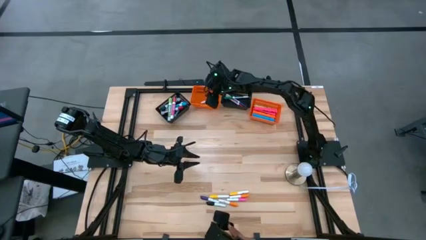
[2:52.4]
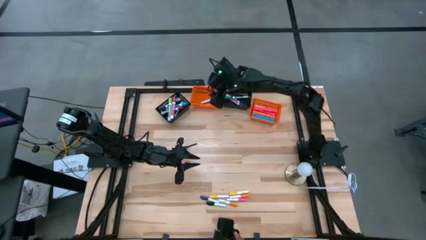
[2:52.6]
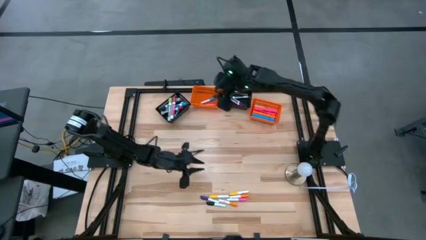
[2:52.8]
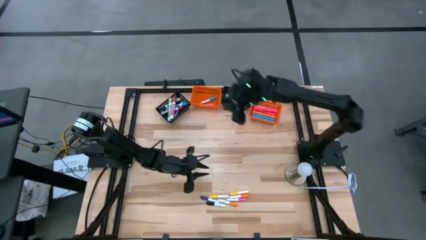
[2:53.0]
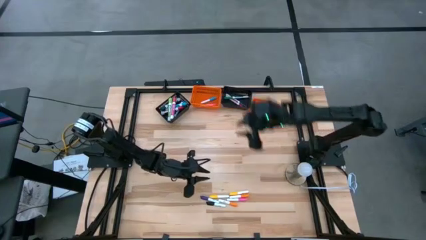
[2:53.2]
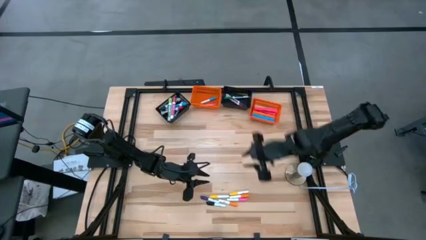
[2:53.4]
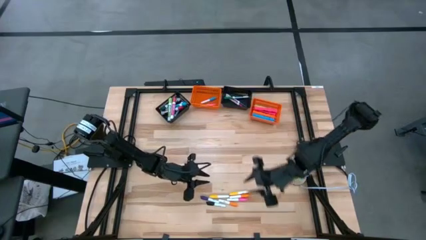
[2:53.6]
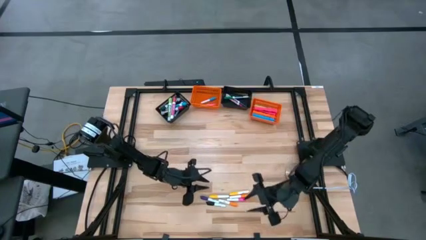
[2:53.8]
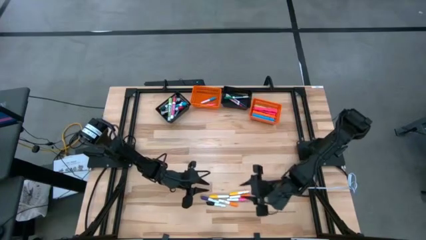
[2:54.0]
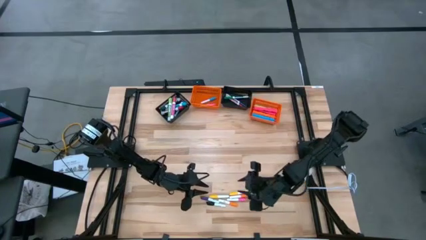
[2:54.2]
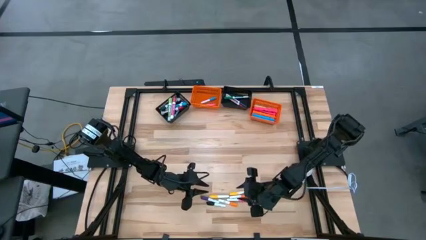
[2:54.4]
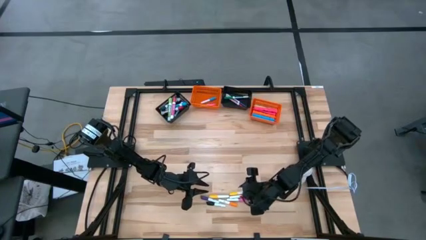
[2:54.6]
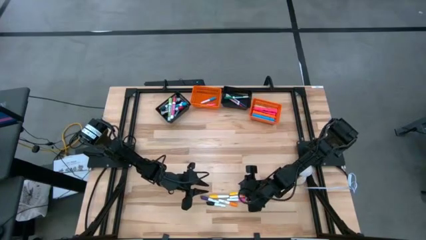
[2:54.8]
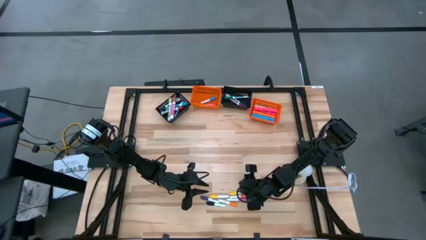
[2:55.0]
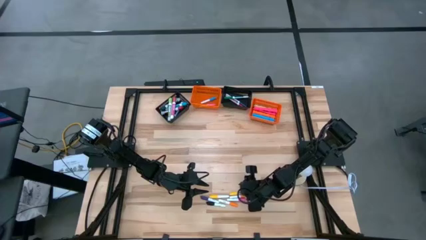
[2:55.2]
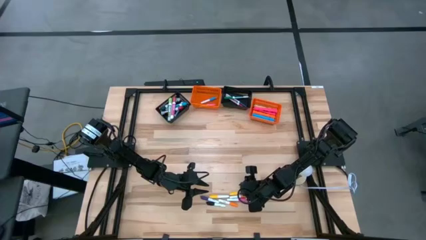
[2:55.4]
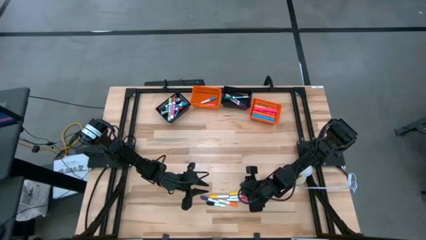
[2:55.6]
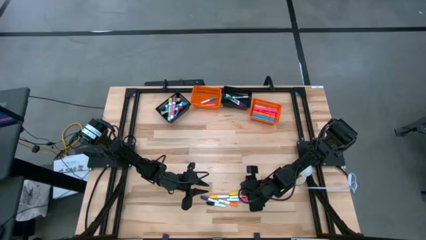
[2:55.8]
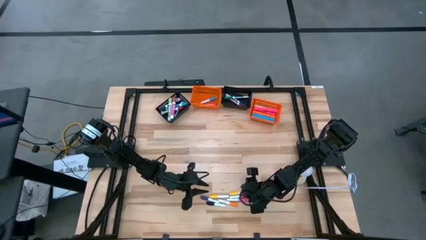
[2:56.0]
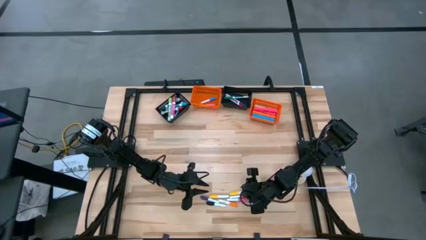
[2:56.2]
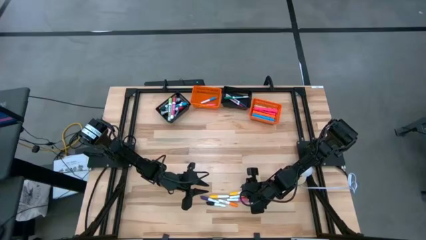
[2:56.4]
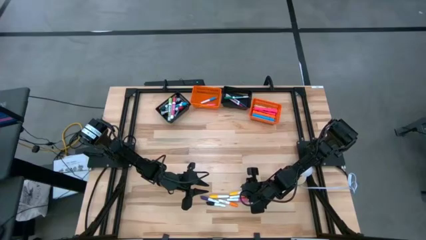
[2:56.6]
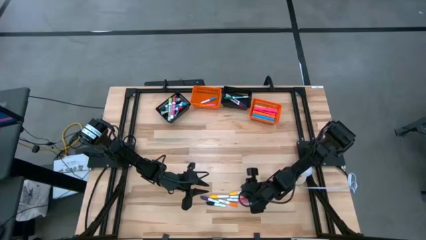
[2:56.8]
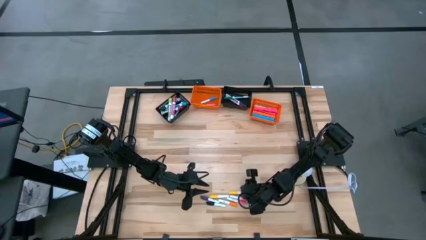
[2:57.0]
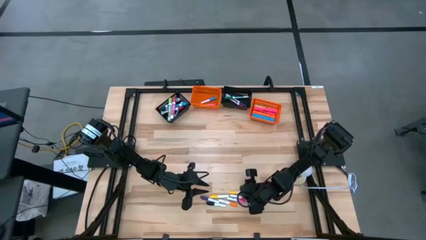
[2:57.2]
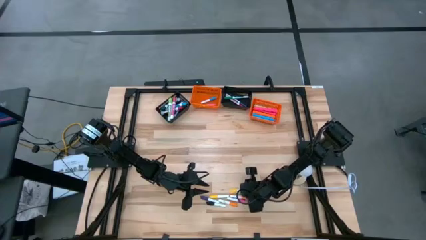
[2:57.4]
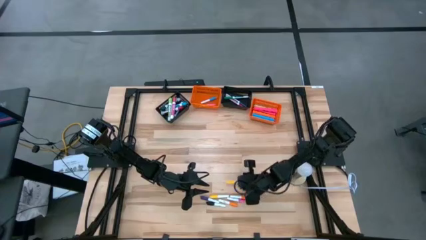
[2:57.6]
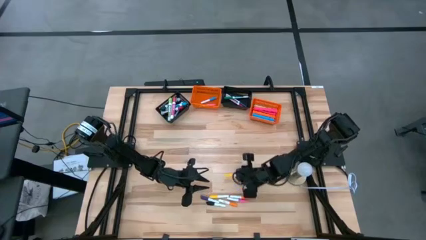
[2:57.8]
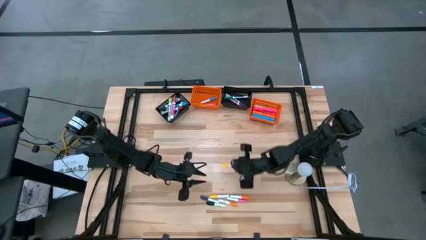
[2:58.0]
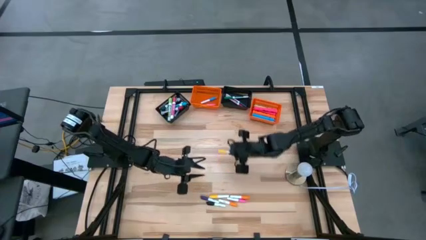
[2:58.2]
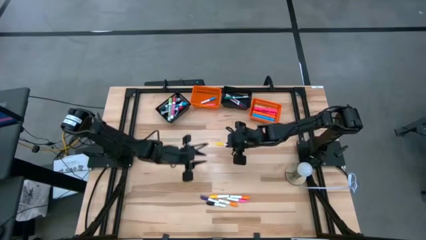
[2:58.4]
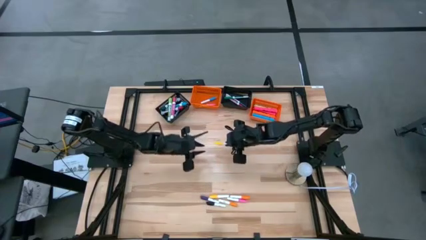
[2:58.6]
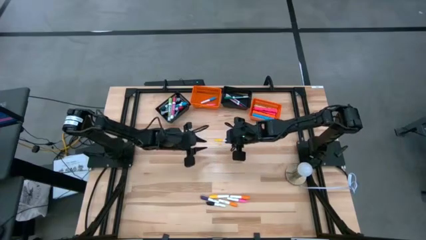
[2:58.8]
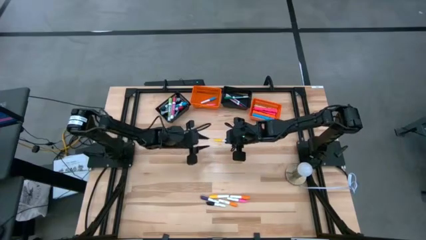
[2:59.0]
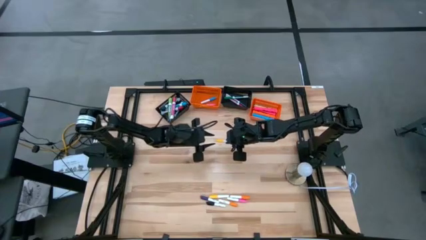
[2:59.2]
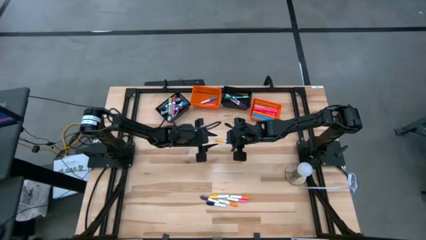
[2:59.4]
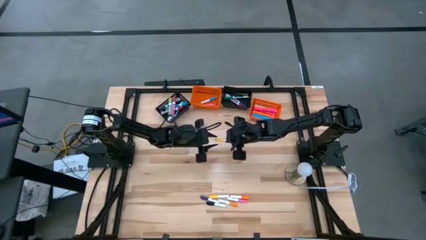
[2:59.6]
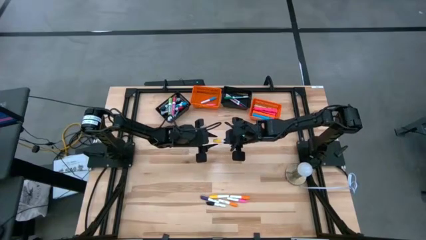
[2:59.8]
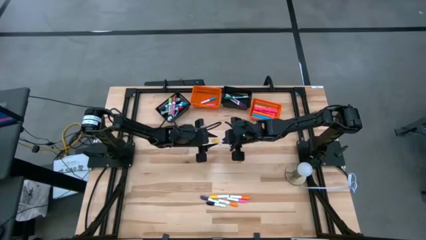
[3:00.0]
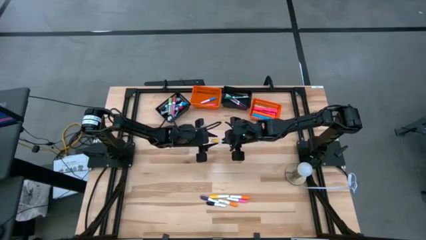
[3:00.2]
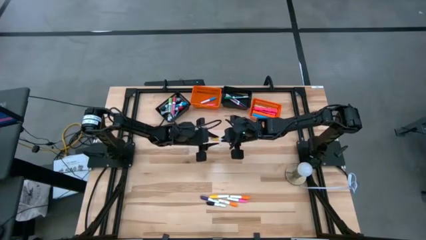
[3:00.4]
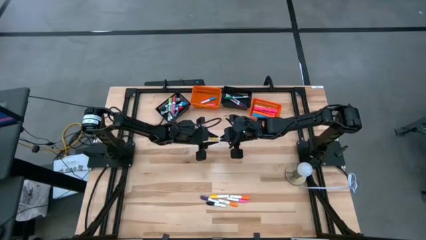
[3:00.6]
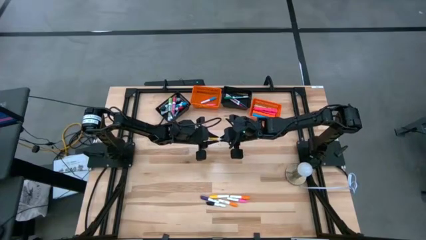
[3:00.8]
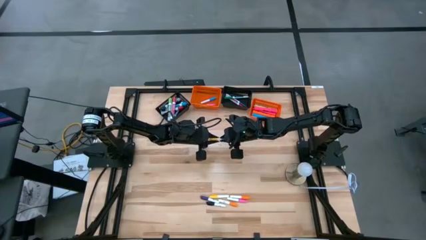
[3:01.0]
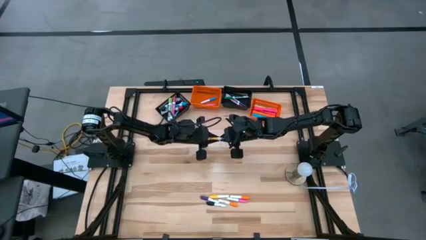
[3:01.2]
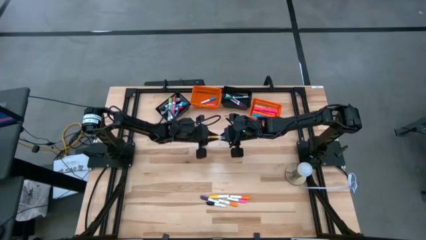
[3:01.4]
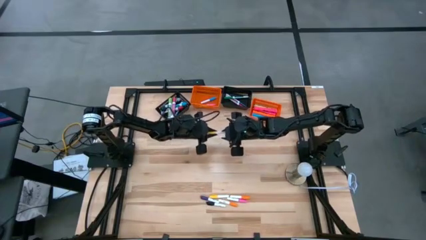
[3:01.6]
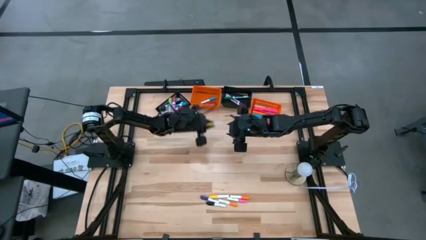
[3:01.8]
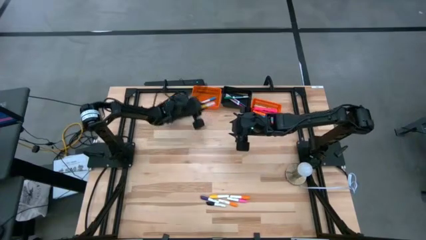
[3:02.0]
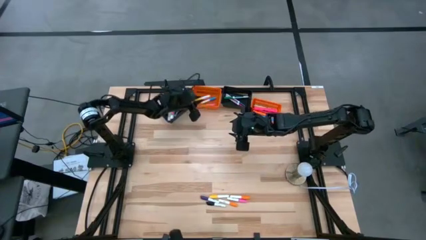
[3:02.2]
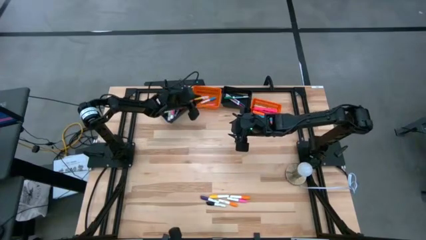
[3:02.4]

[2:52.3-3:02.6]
Task: Pick & Place Markers
Put the small yellow highlighter into the left orange bin

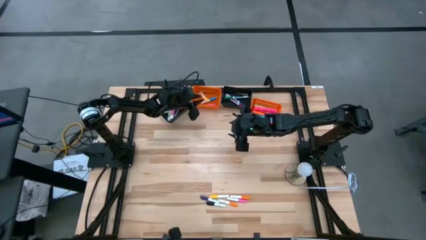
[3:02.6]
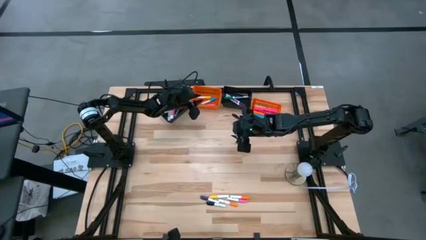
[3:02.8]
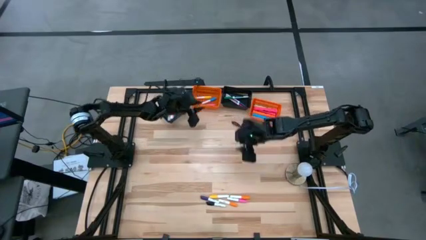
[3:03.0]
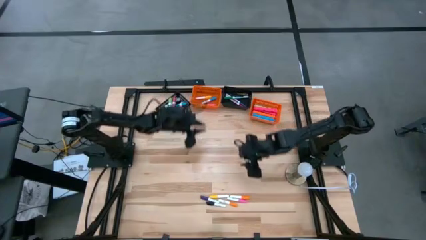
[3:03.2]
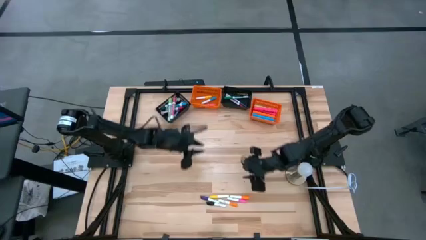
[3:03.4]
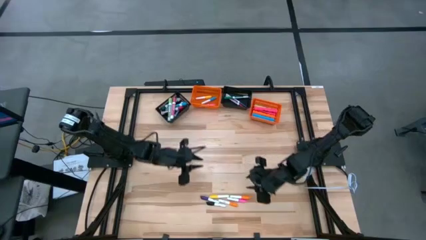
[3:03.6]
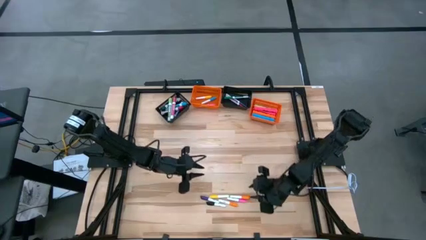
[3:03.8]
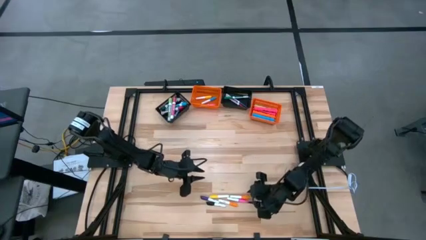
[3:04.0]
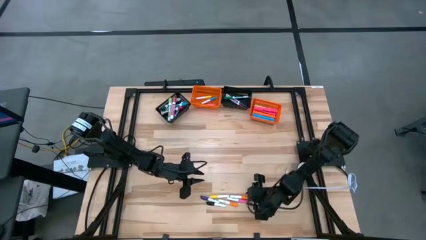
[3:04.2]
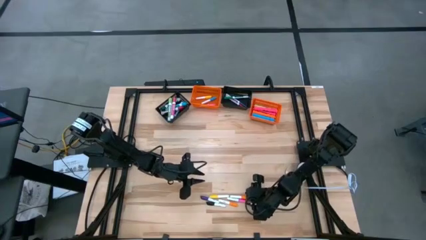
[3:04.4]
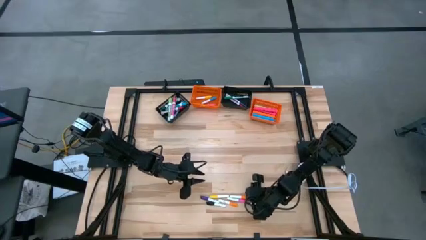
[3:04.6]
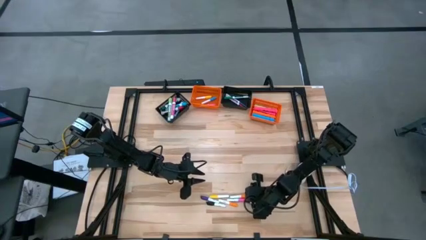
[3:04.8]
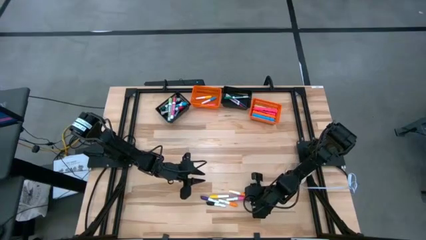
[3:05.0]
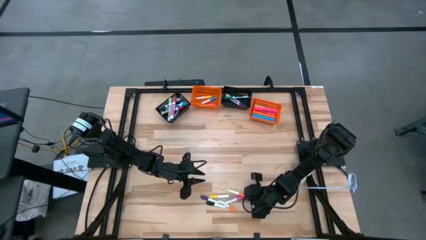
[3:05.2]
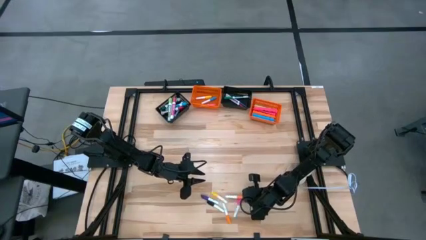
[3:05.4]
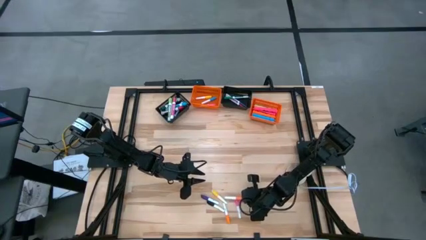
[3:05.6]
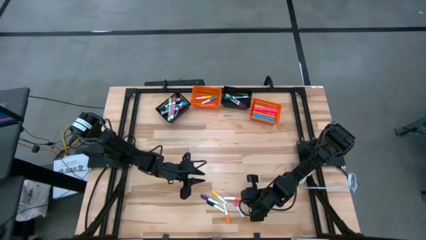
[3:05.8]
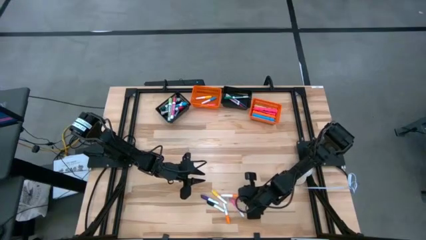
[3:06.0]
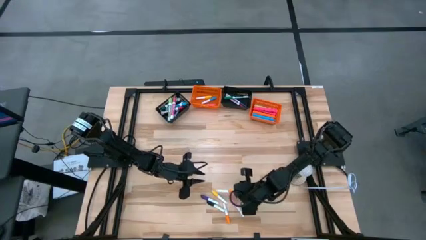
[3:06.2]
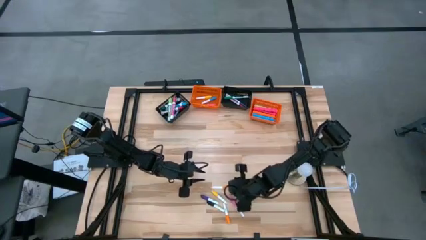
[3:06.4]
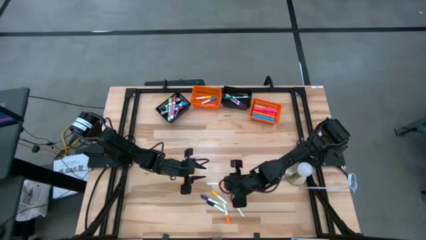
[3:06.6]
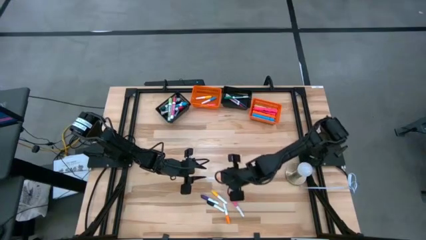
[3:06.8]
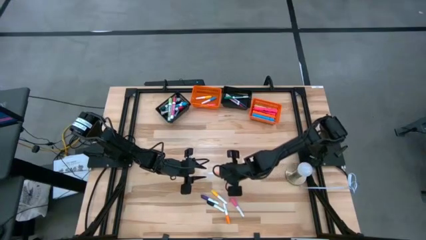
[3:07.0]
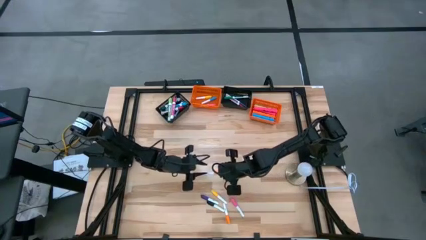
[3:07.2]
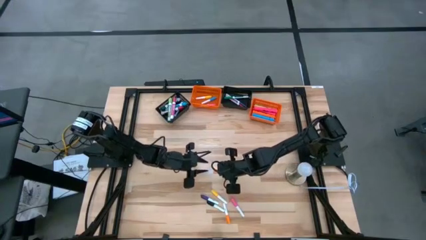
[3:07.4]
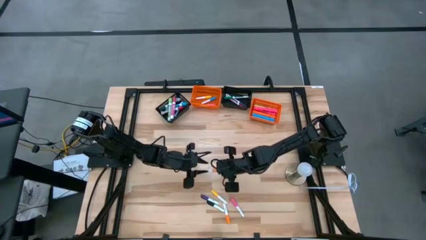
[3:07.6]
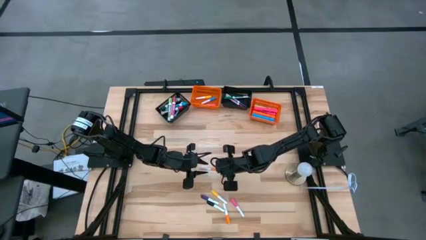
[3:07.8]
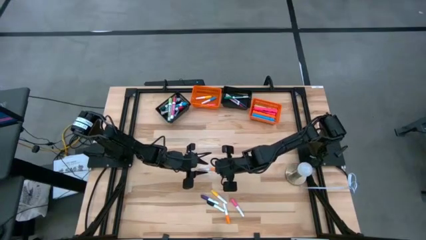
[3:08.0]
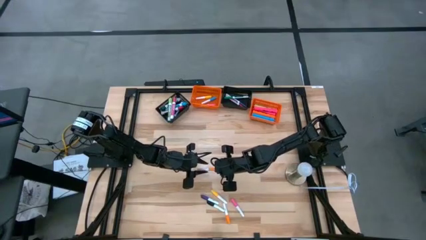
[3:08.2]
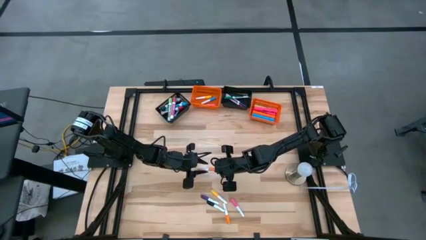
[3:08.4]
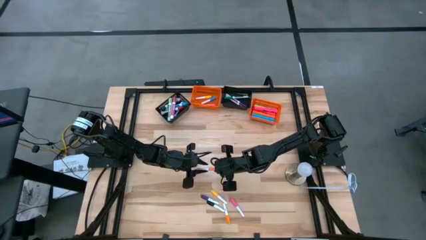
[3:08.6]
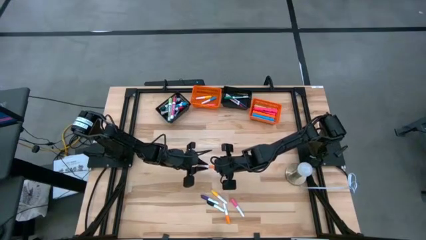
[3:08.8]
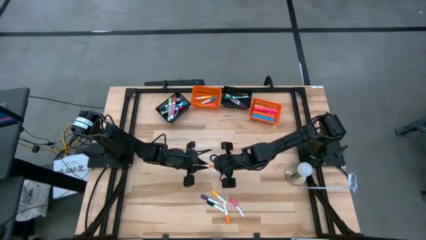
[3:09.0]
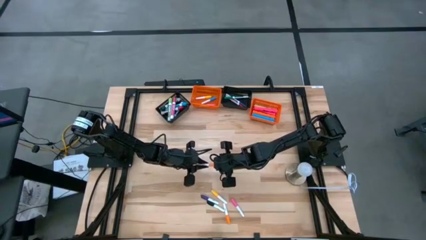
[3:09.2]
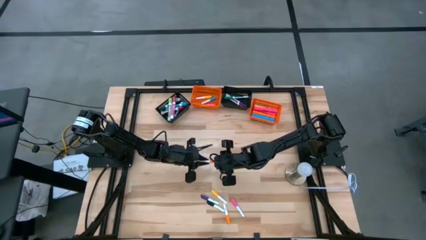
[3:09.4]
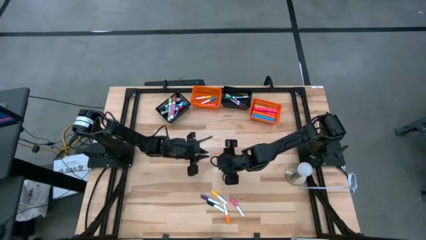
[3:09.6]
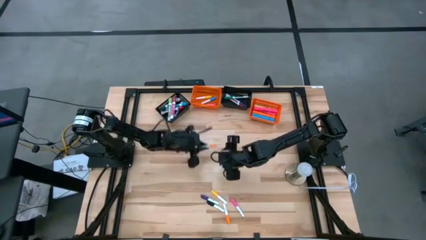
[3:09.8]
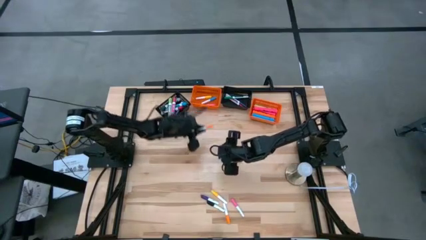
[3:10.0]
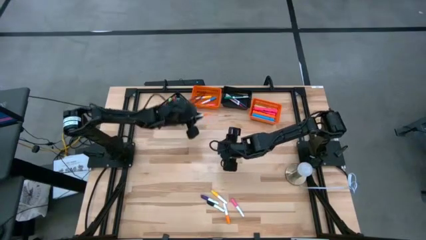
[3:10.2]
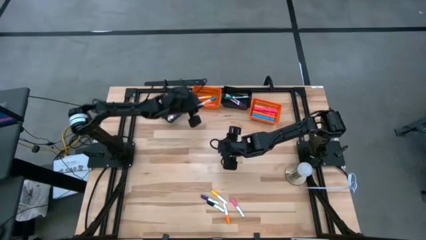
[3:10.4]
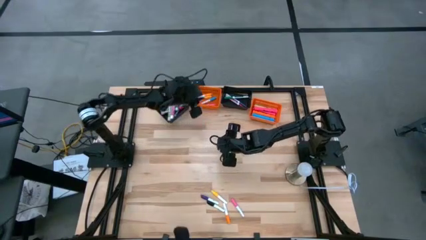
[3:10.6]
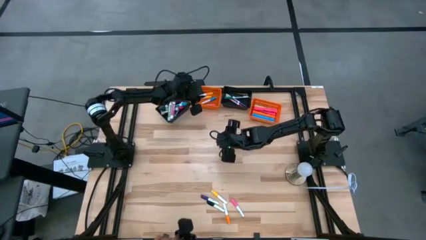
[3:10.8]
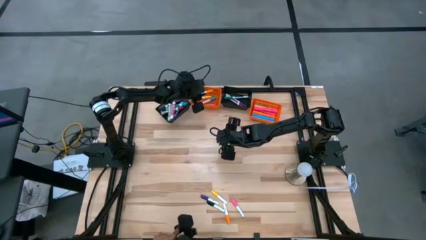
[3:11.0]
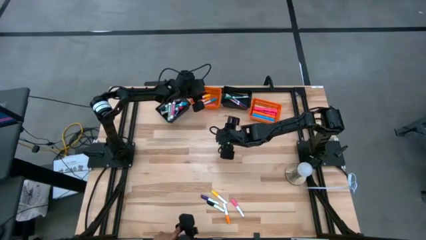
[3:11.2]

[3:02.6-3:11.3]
Put the small orange highlighter into the left orange bin
